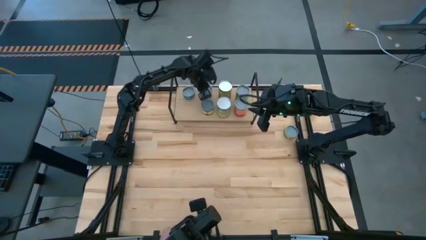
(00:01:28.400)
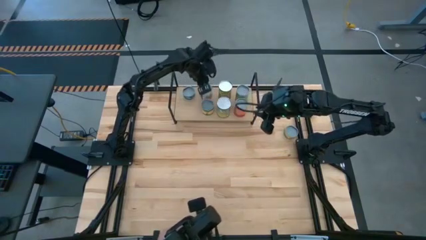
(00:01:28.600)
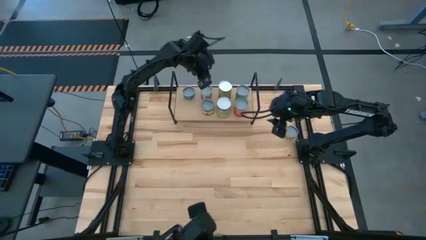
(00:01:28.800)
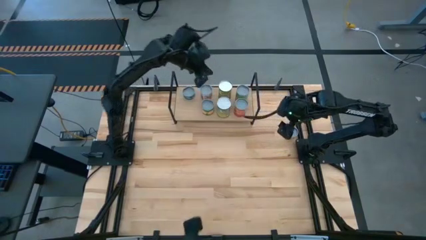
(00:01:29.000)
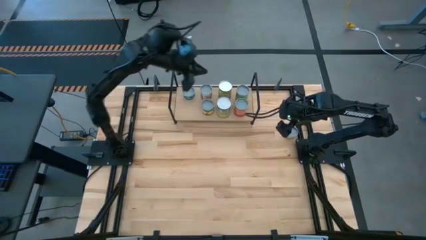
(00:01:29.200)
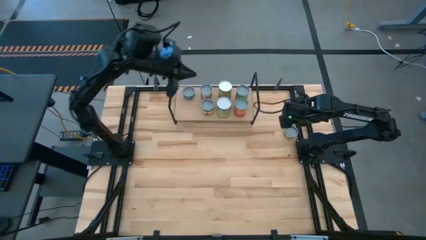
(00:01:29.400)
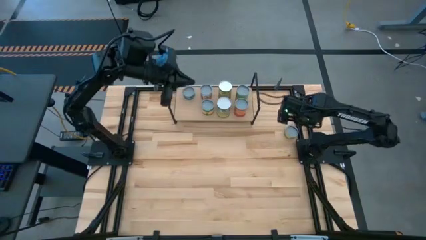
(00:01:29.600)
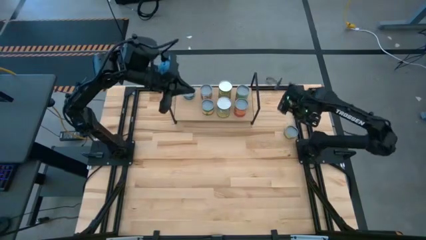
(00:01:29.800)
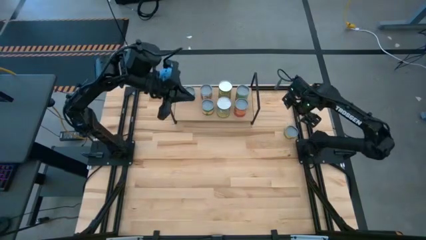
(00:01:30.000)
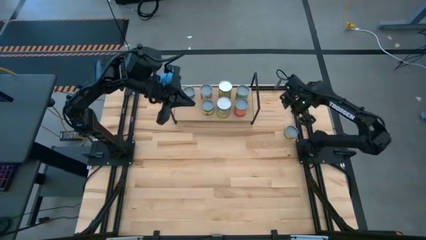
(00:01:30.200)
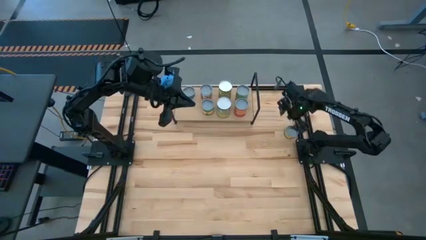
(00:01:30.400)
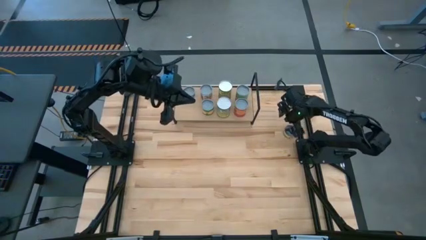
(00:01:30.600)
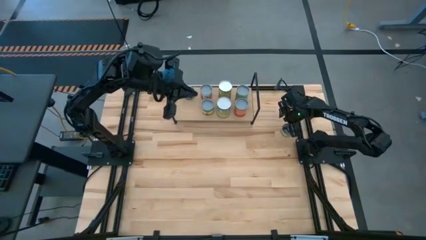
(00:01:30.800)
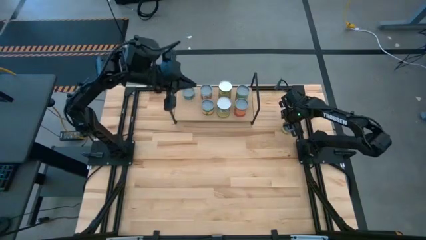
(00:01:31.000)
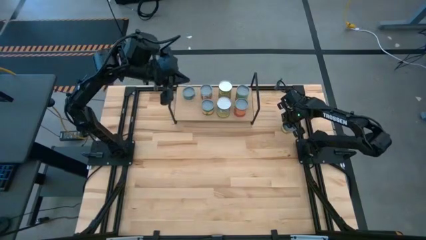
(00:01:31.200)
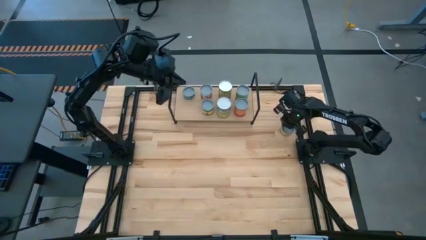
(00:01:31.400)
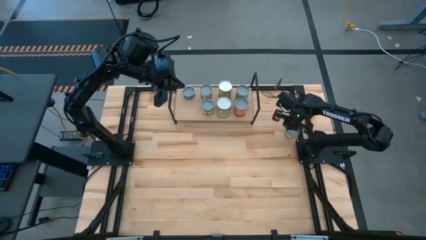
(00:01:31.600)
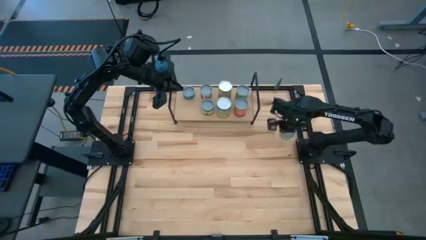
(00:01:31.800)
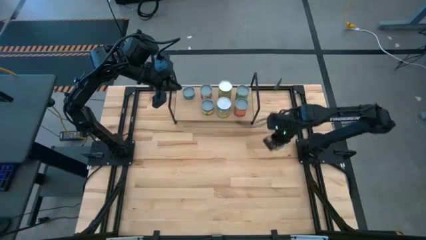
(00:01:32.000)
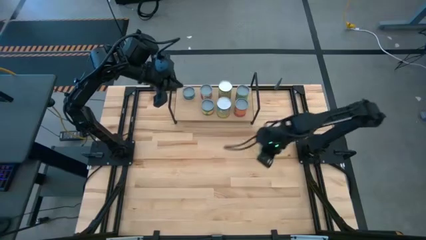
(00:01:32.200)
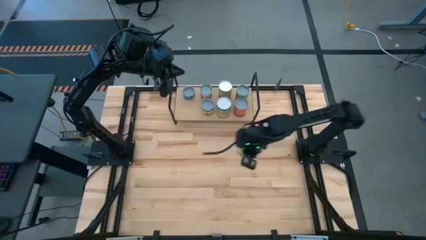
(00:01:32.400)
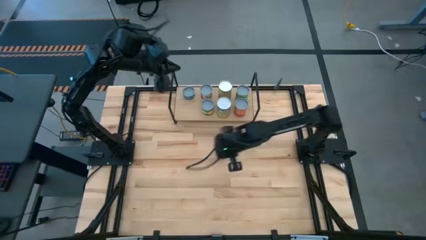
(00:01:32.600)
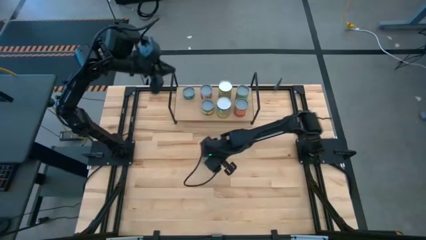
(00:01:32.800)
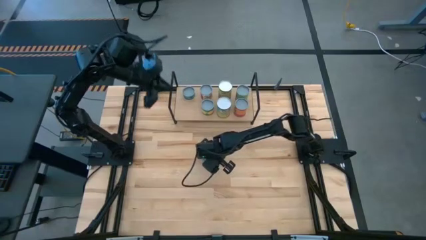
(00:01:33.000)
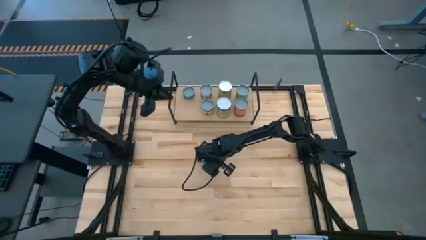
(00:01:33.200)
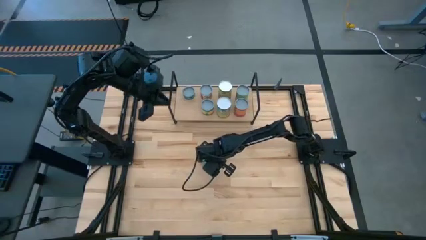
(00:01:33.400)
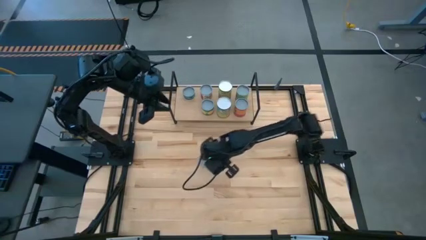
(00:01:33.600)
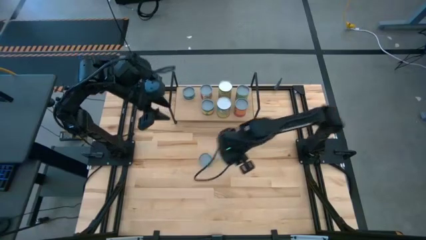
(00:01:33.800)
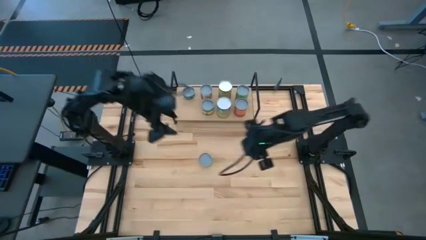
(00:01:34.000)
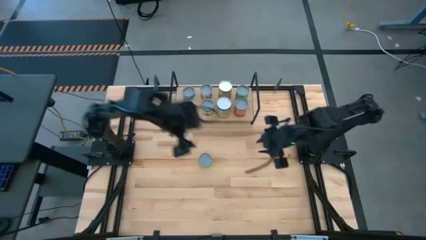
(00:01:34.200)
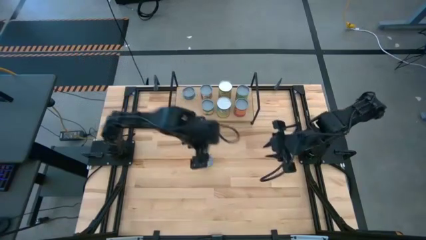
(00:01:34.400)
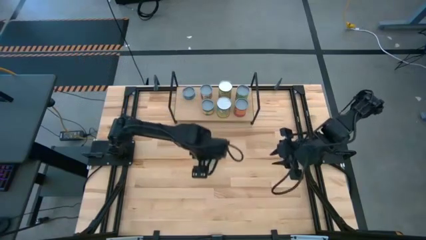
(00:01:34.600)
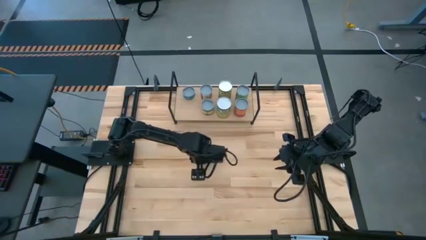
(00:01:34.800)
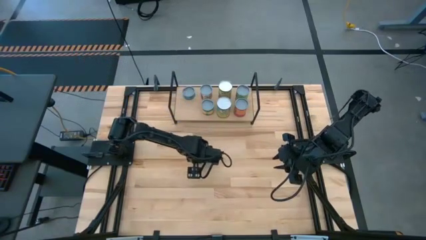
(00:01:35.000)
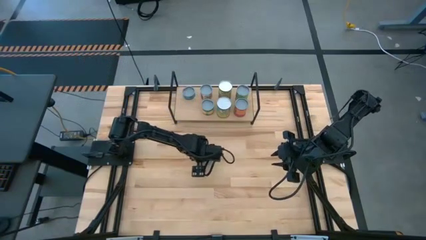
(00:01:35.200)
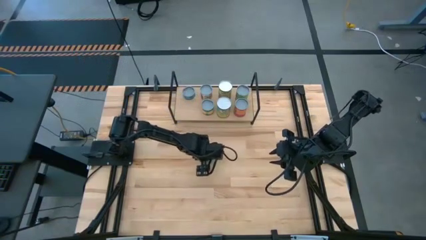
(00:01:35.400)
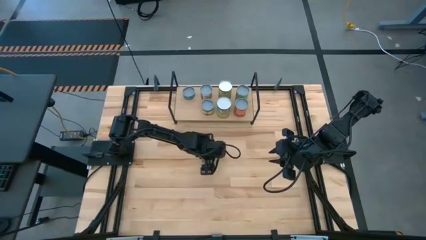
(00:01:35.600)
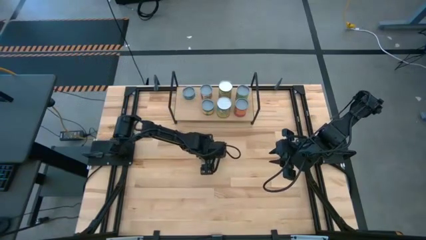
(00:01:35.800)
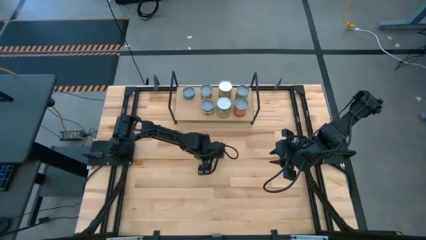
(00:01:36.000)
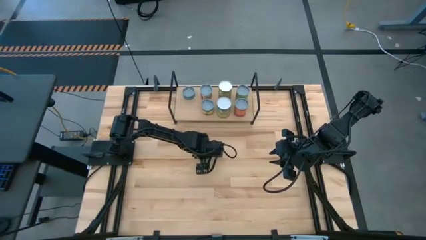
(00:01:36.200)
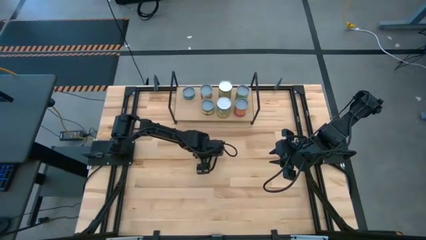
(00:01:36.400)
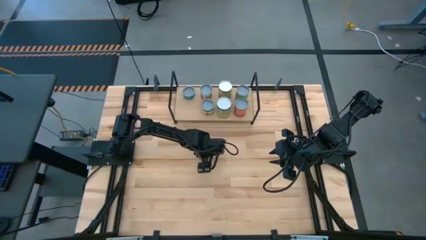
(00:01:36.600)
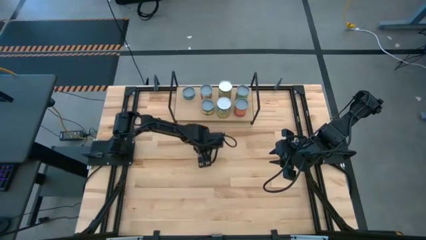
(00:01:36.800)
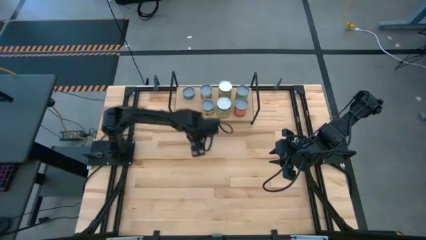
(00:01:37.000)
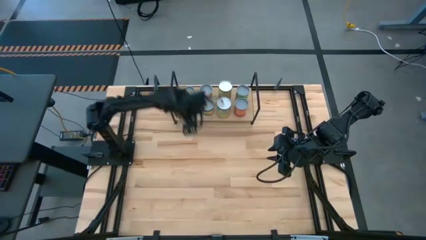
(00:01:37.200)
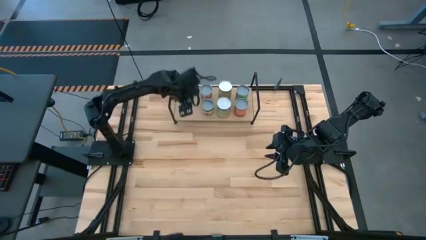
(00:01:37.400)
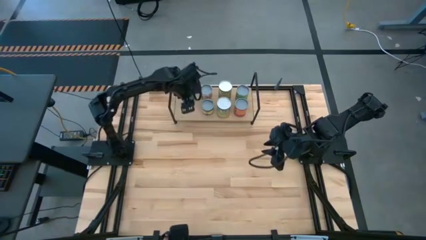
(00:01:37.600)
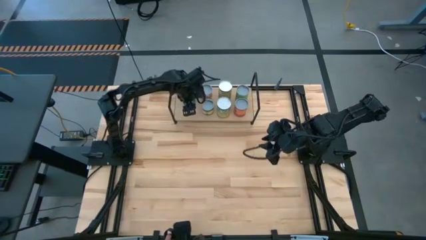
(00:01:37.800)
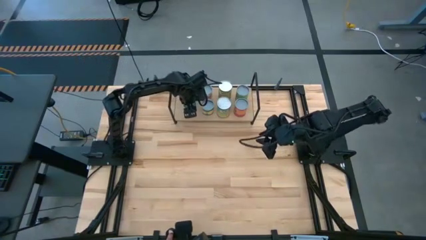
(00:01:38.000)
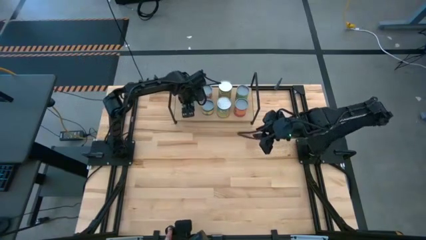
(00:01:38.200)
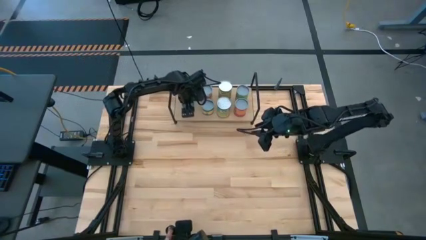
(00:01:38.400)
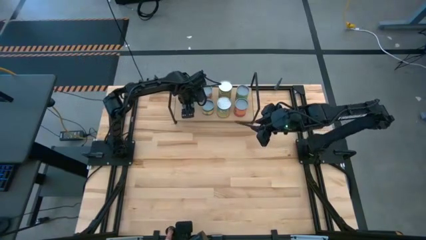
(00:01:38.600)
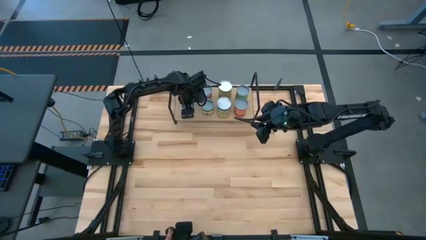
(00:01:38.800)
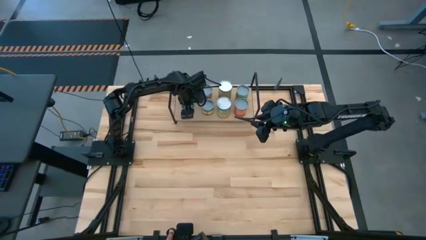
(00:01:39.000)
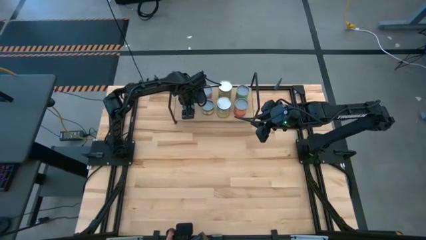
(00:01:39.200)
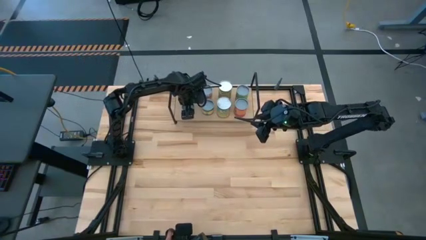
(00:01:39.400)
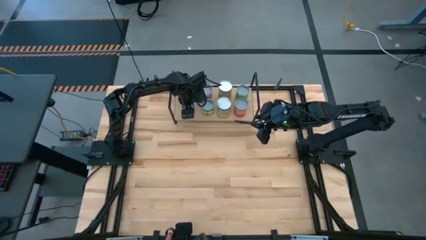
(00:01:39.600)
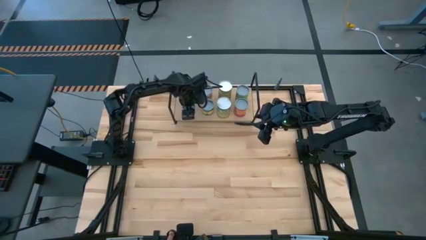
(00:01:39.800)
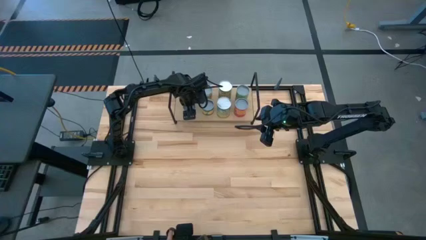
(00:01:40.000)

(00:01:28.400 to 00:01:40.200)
Task: Pick and place cans onto a shelf
Put the canned mushrooms on the shelf

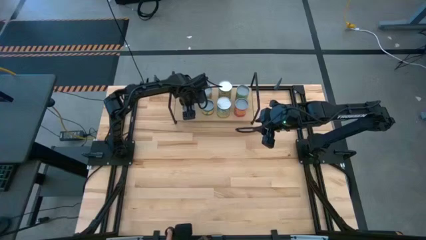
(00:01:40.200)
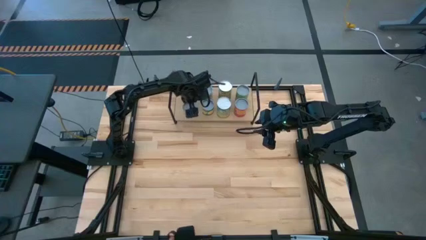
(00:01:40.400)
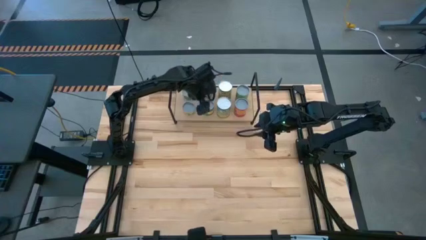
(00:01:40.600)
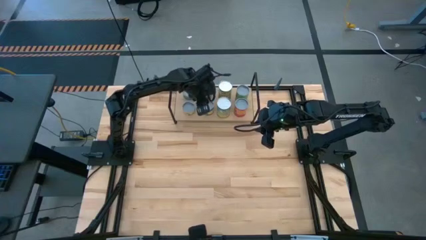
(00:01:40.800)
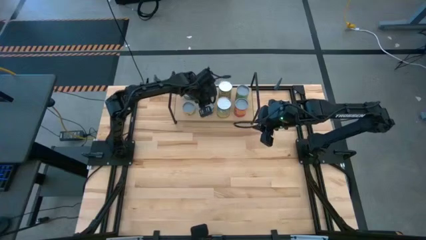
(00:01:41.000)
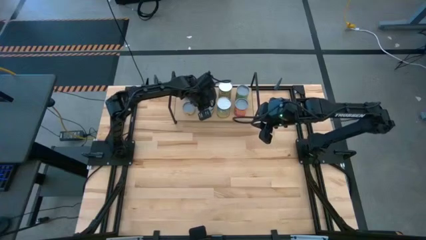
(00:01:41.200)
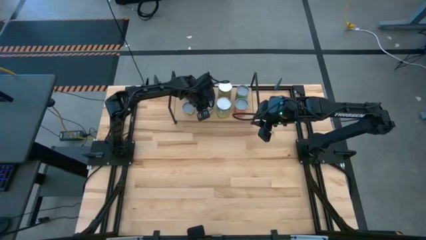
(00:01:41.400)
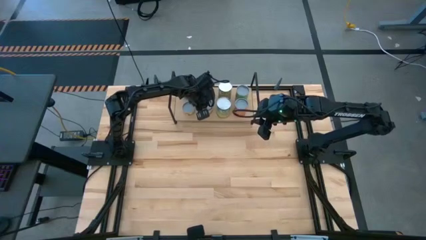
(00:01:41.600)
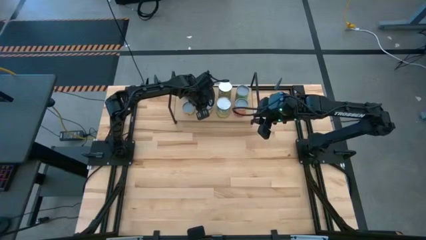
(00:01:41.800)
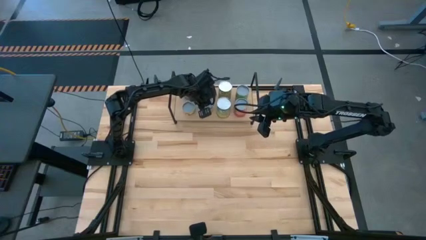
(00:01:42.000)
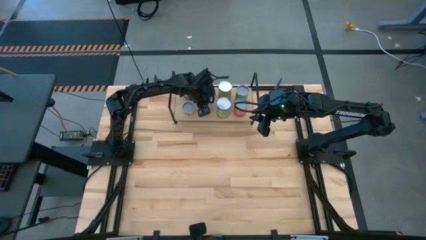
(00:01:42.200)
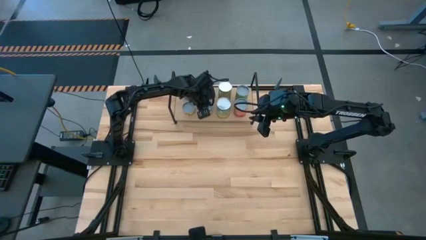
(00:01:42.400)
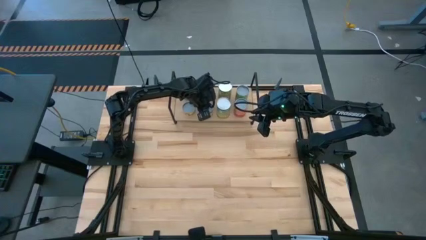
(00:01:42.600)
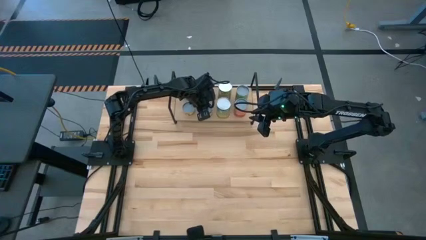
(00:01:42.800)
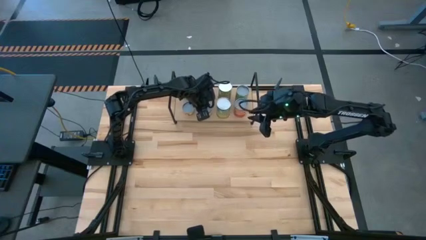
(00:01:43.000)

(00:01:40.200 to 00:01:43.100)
Adjust the canned peaches on the shelf
